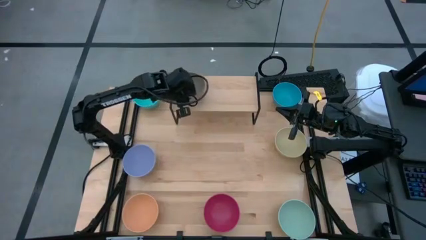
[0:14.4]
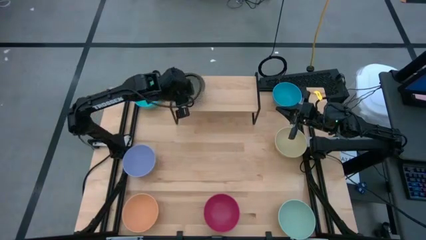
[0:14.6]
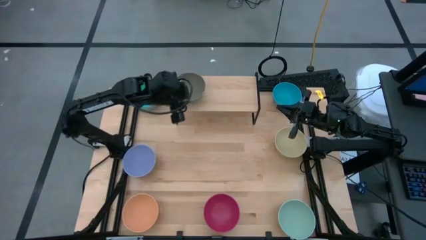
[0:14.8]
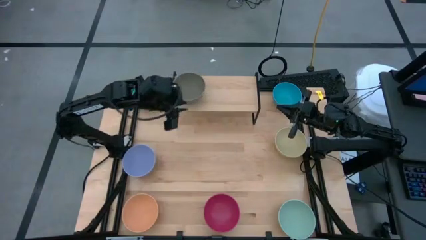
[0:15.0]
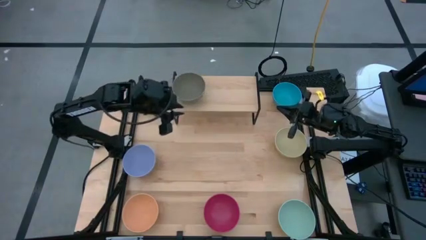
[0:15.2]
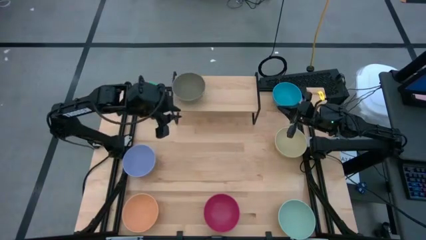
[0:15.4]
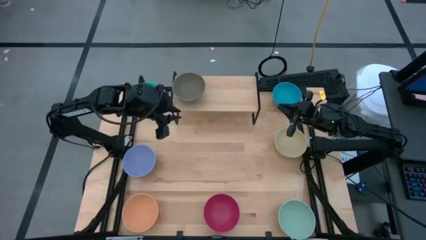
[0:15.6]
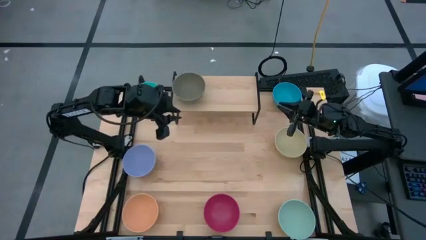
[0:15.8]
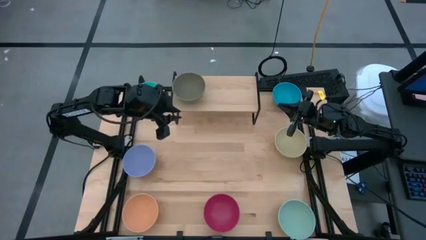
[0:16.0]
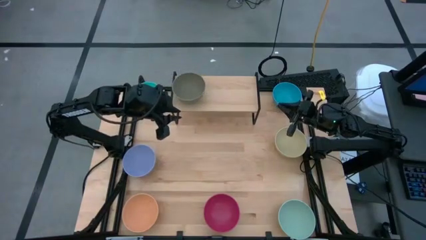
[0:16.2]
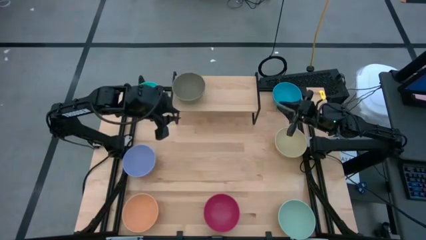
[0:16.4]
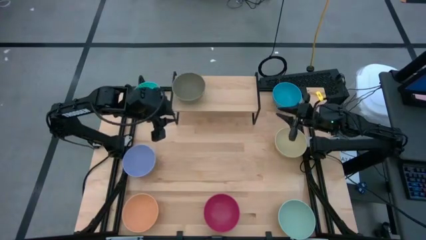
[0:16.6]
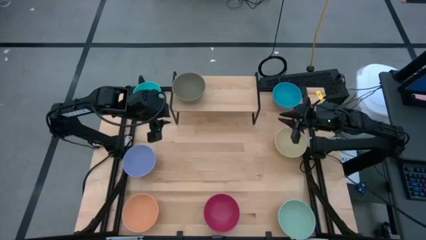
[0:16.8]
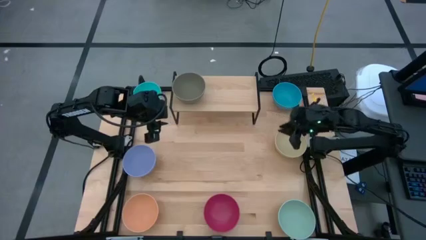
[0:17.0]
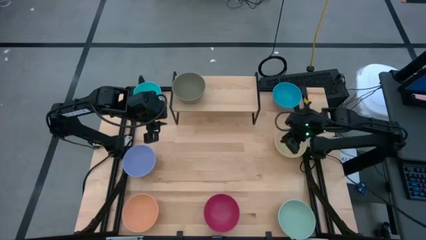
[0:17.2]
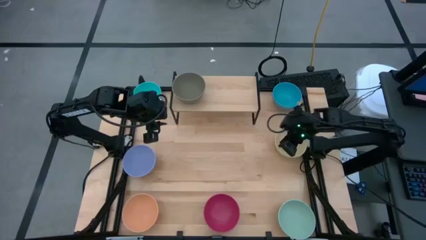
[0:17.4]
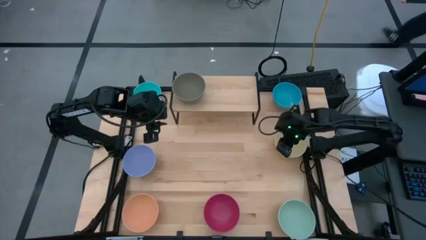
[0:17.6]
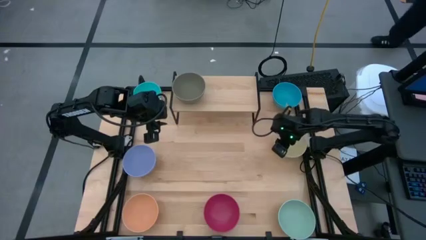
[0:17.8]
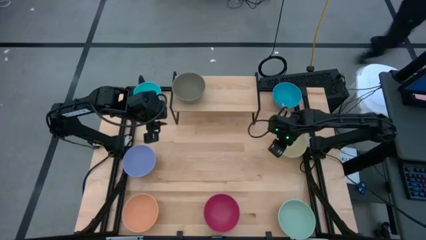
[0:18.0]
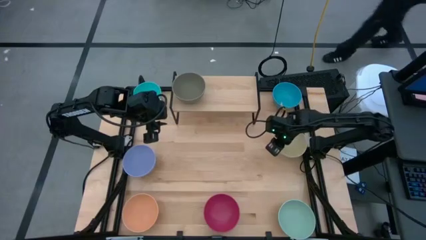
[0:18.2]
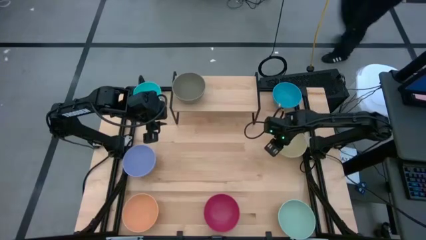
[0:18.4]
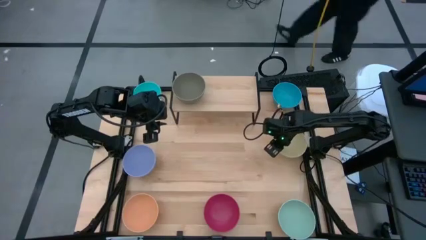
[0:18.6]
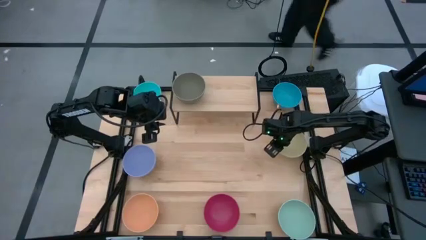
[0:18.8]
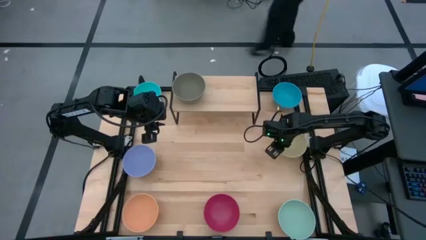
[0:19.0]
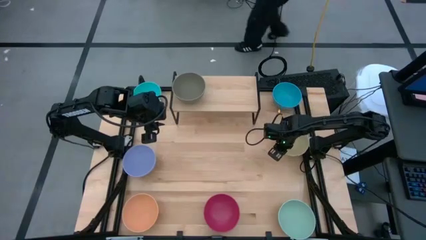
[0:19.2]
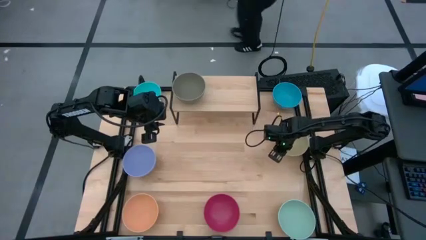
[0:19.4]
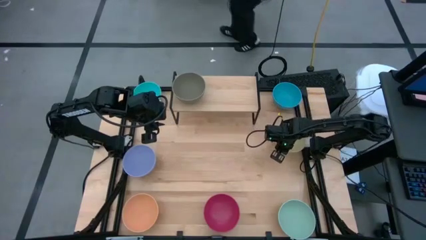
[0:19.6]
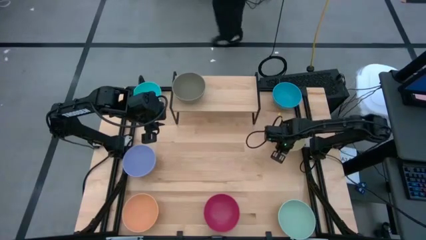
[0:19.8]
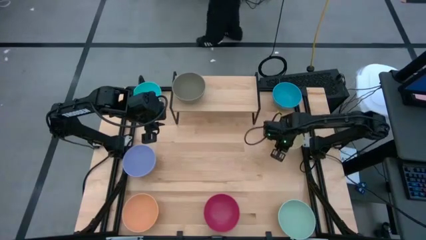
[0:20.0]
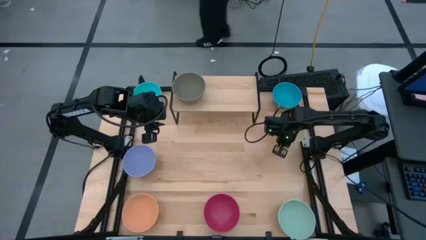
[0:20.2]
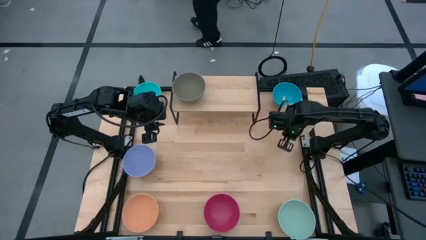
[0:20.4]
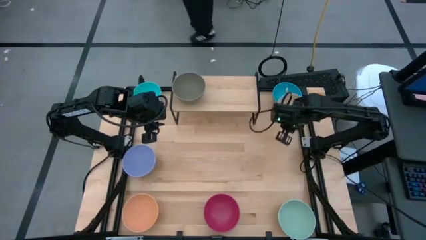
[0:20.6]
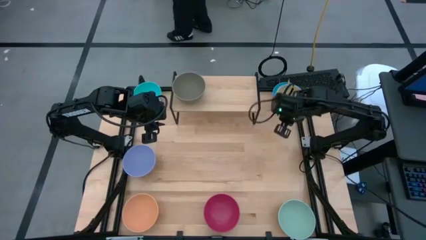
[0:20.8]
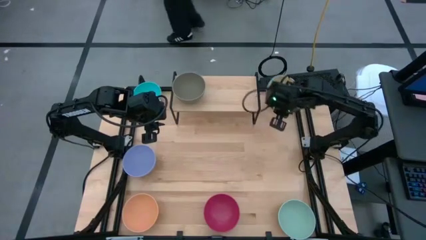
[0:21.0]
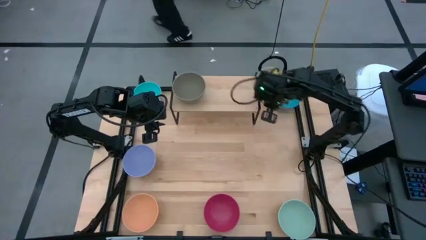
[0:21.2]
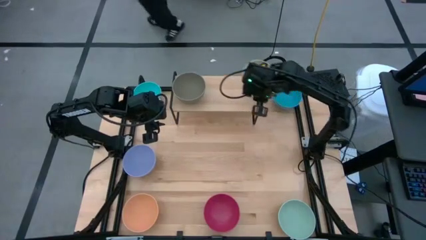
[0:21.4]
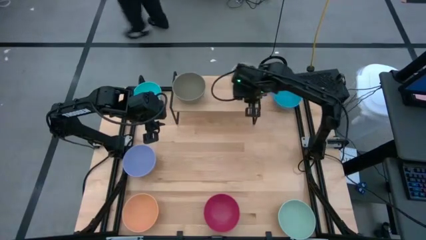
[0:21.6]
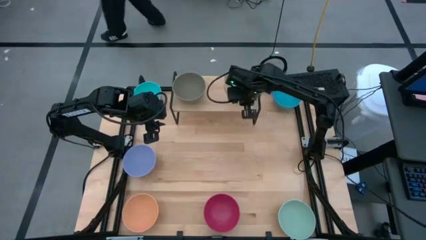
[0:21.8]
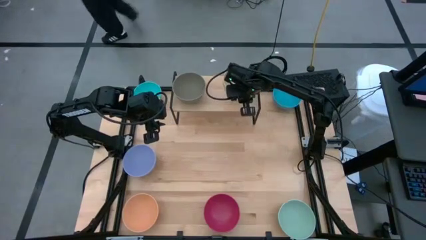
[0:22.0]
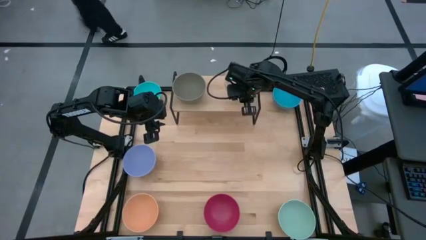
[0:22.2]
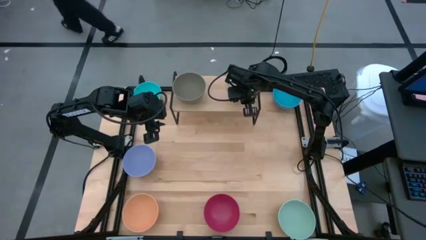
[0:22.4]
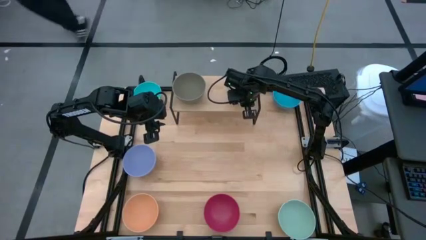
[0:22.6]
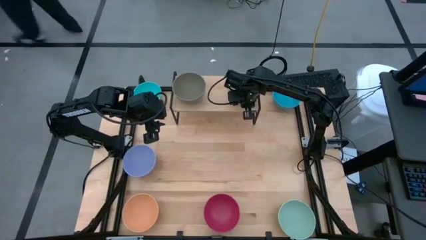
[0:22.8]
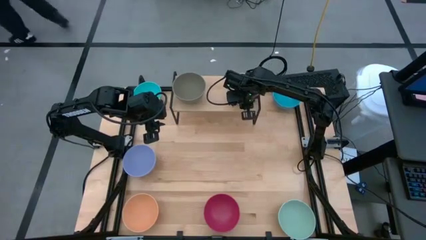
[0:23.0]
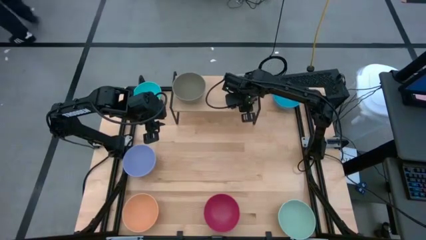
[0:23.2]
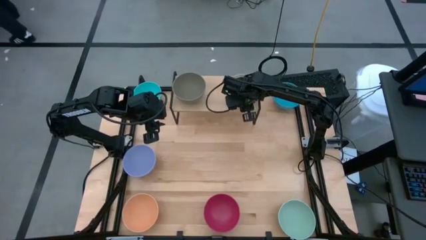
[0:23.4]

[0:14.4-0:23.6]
Task: Place and stack bowls onto a shelf
Put the yellow bowl on the shelf

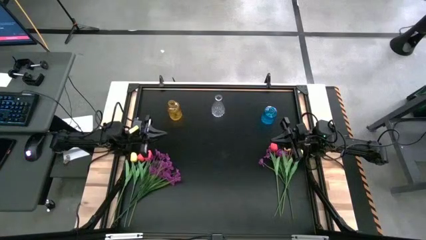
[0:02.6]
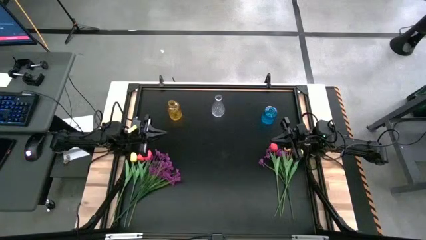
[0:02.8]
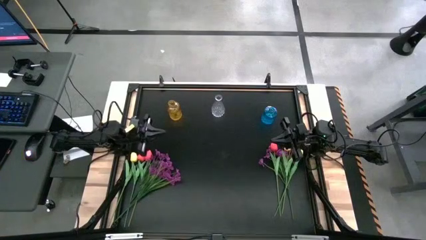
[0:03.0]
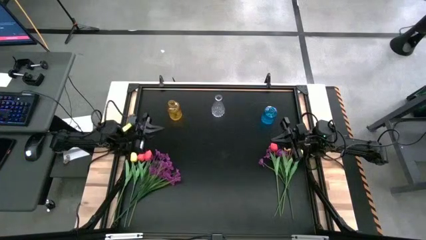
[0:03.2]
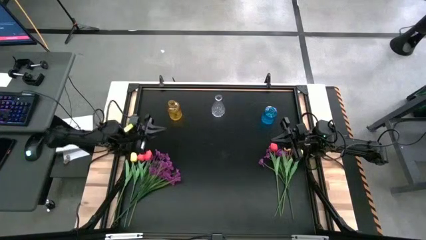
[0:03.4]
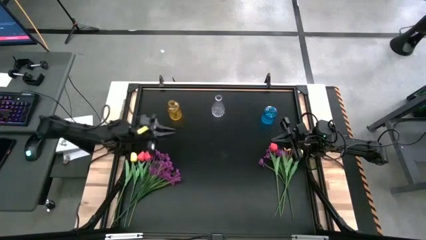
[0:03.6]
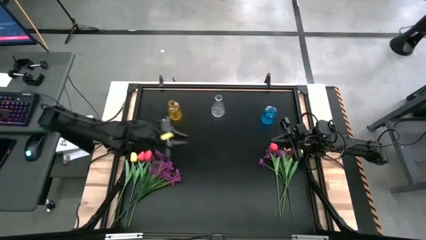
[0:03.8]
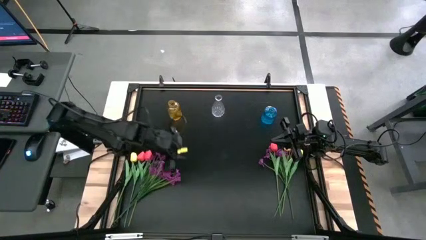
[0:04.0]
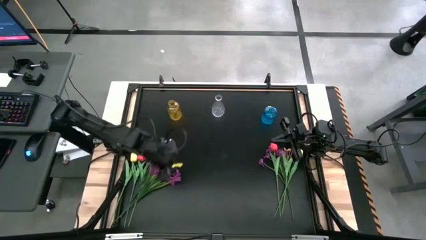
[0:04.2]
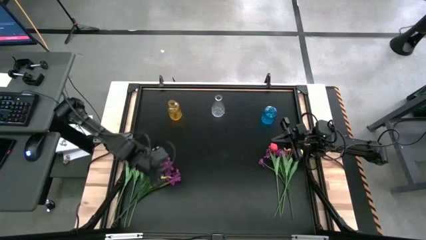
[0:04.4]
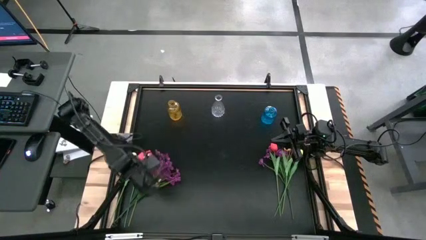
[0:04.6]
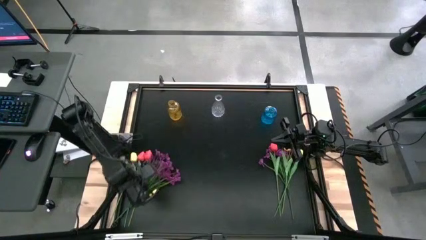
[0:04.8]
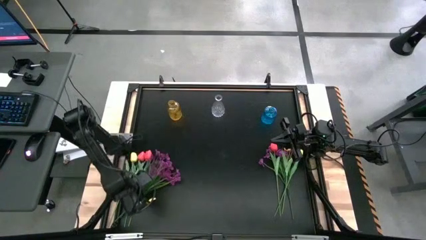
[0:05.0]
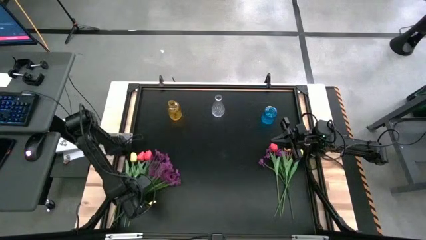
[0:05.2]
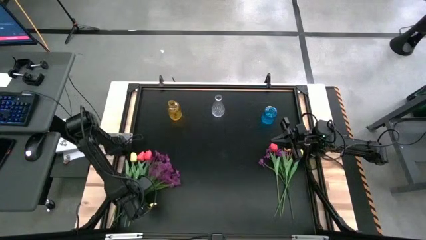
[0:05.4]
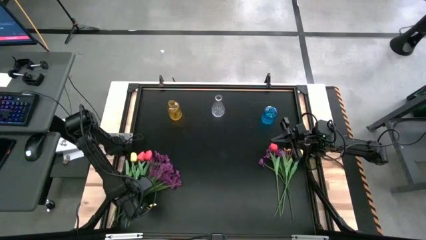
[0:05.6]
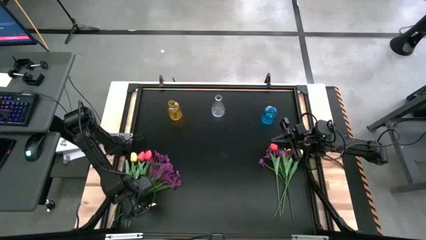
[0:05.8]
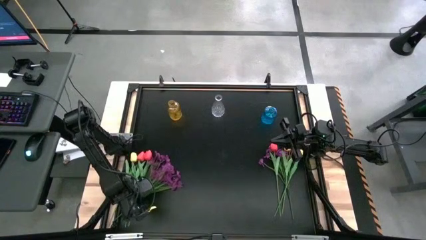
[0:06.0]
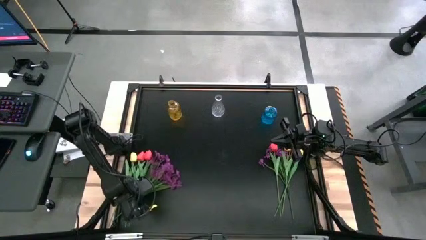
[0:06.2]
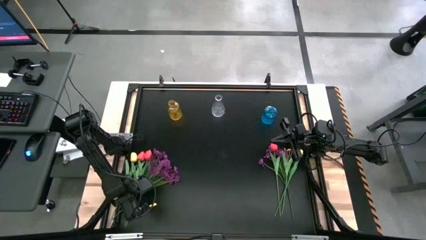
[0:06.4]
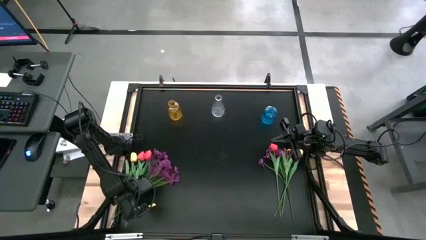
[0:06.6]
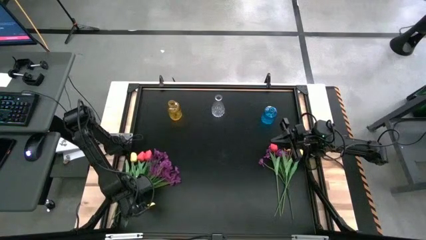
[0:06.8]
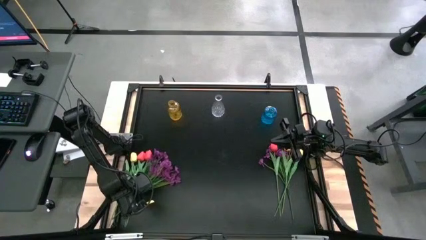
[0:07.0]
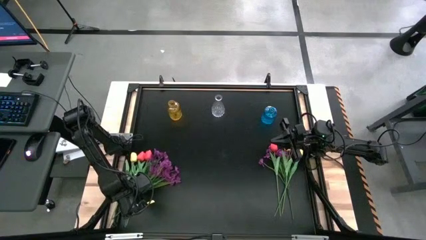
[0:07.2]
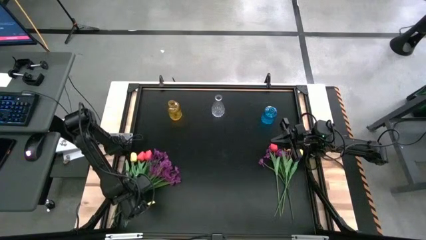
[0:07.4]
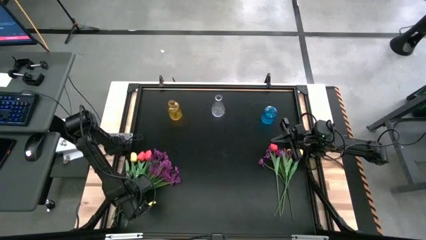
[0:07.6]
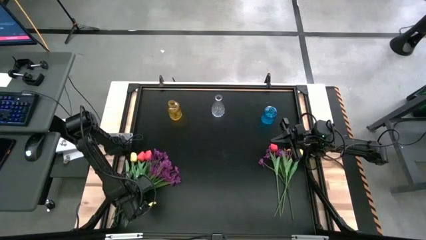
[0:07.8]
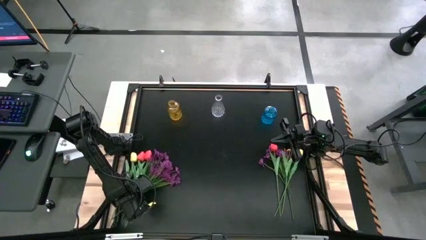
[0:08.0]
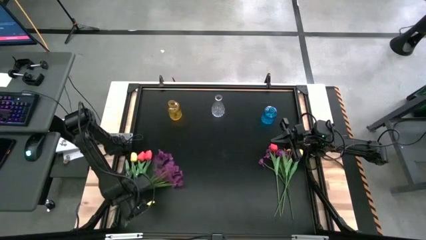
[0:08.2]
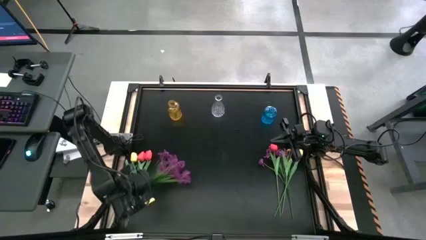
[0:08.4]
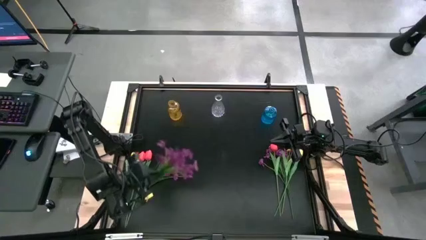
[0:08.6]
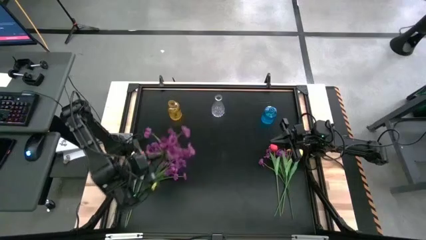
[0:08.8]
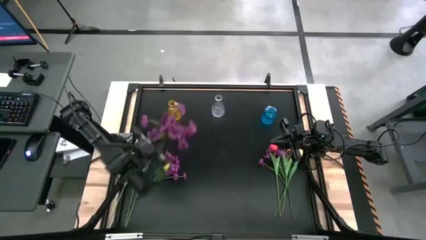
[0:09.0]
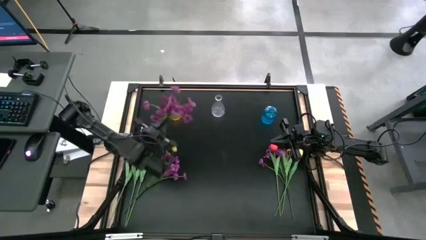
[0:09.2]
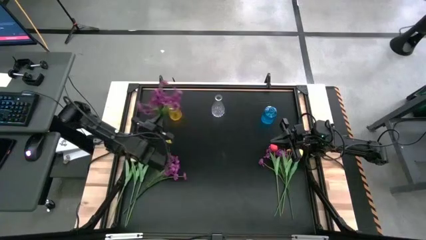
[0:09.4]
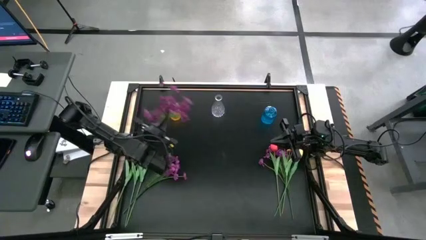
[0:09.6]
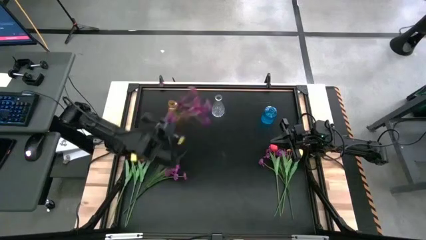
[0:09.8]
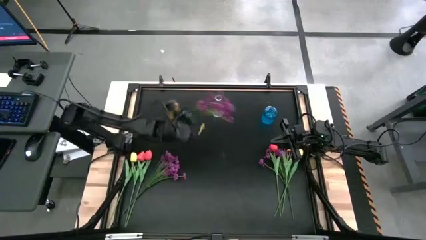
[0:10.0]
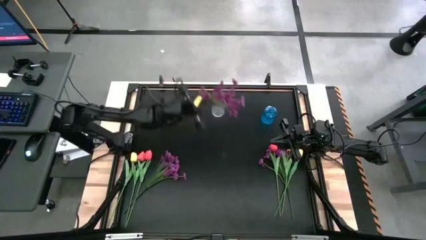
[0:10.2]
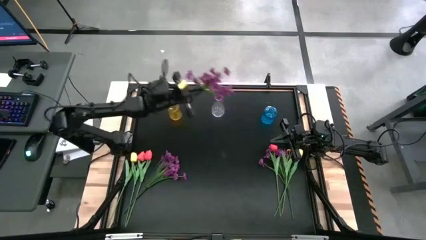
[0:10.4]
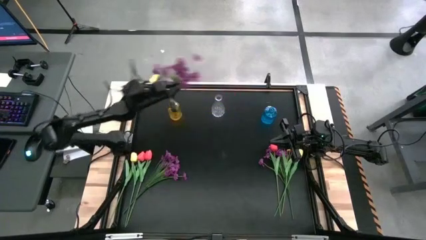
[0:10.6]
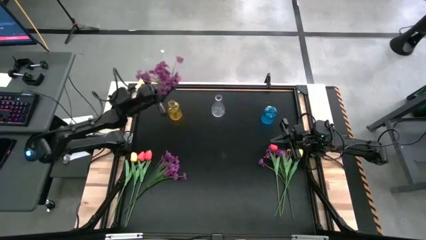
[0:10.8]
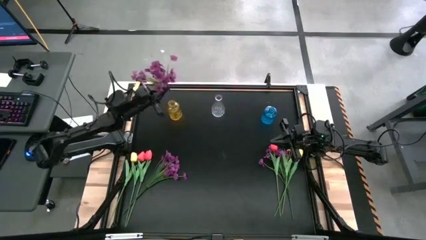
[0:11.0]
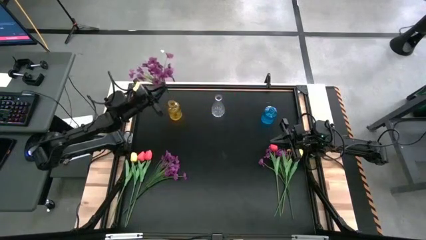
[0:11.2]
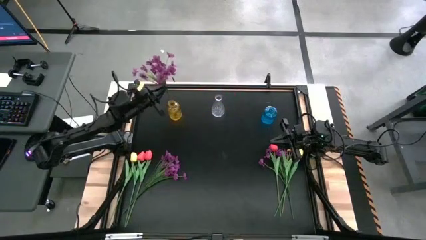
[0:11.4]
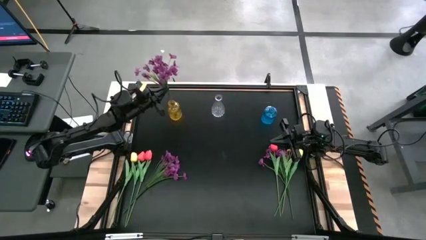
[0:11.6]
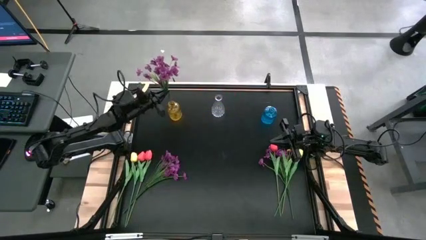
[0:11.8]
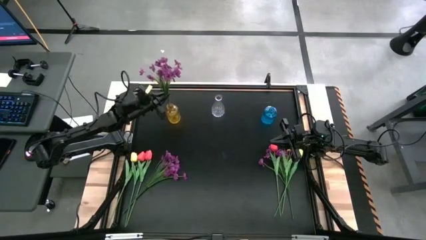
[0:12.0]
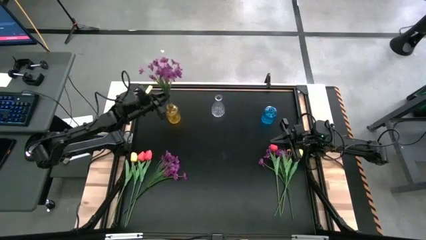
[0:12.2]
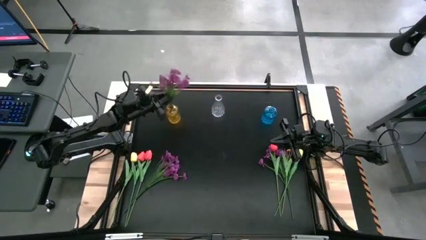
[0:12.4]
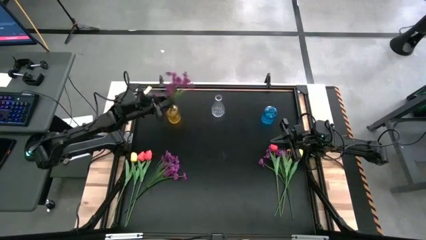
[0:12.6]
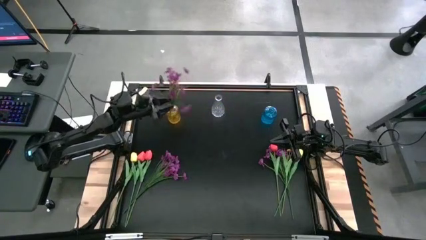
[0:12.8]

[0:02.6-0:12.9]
Task: Sort flowers into vase by color
Put the top left purple flowers into the yellow flower vase
